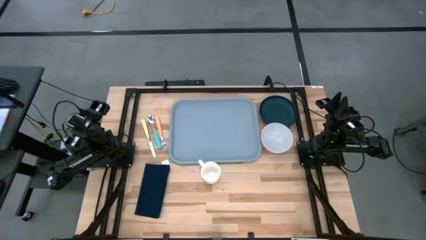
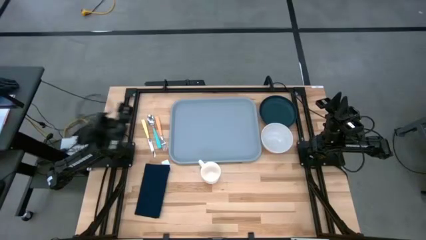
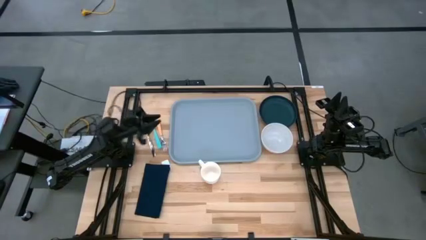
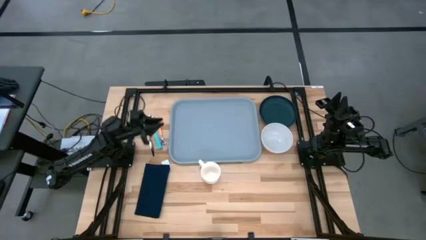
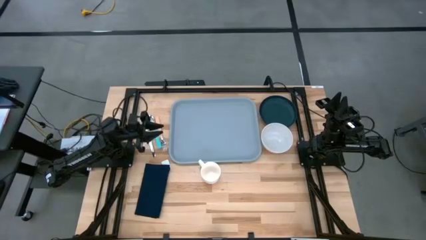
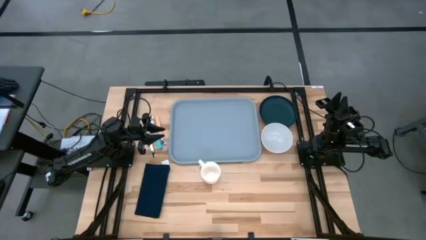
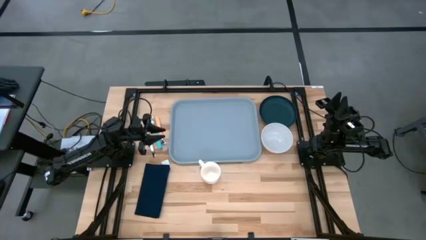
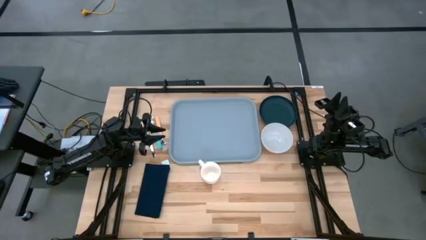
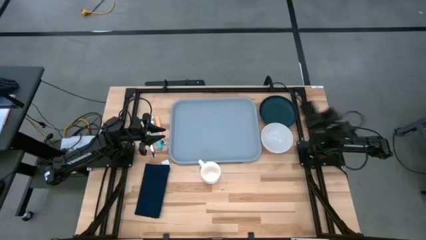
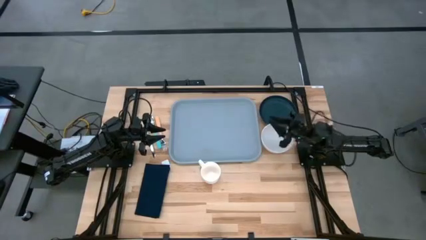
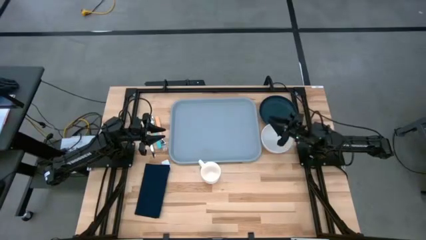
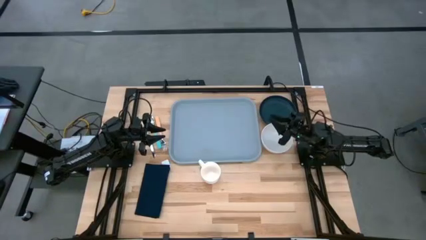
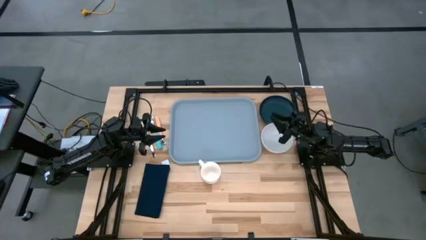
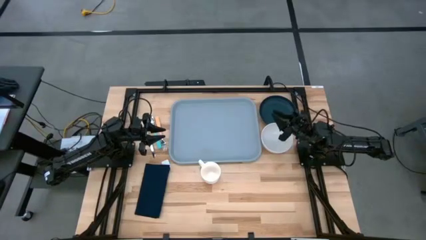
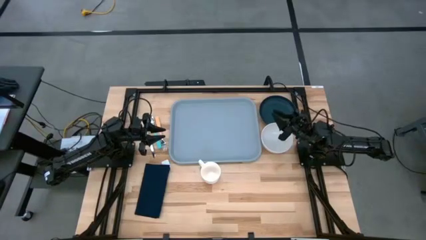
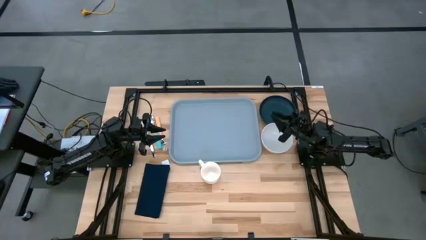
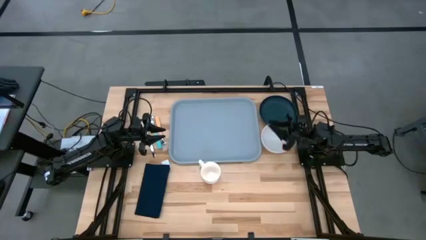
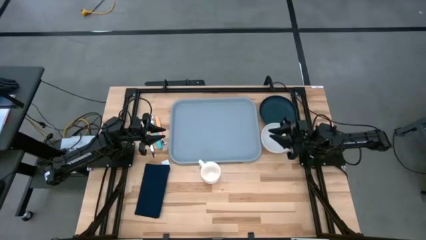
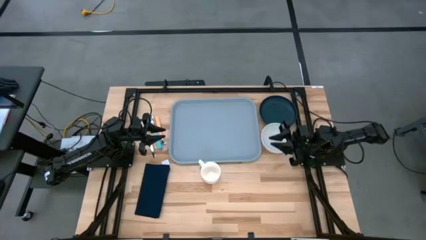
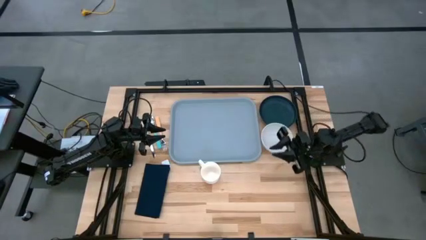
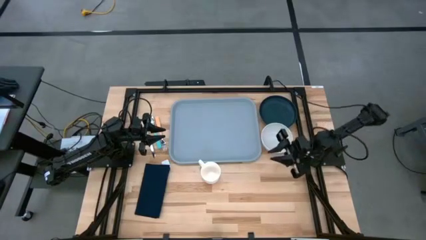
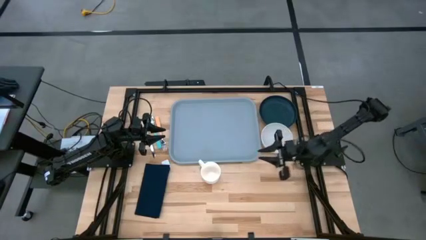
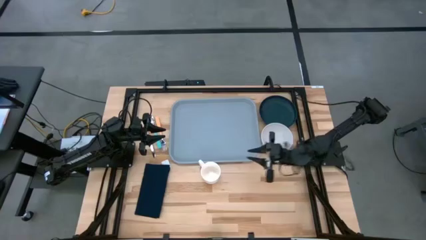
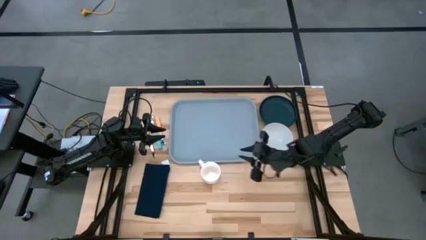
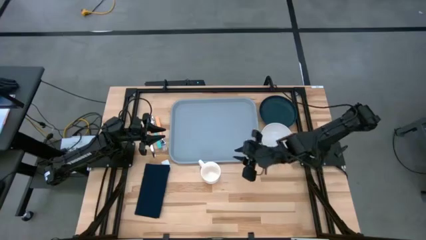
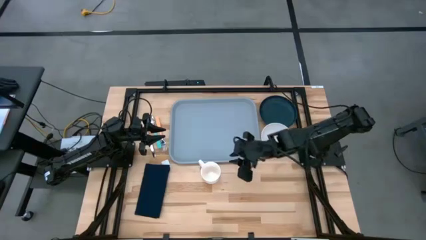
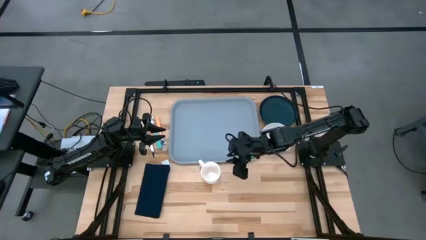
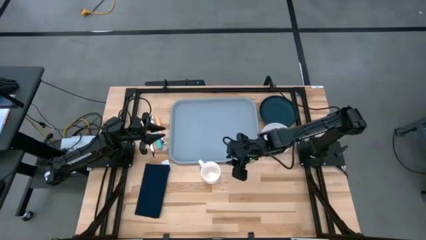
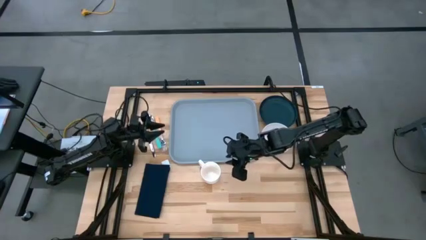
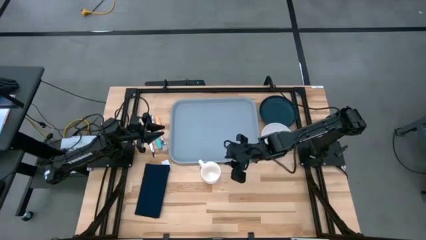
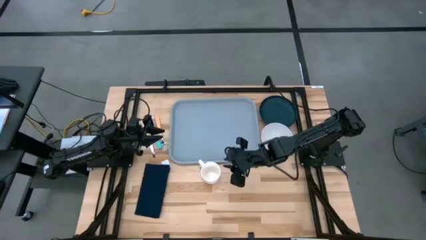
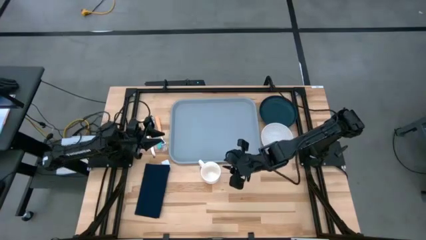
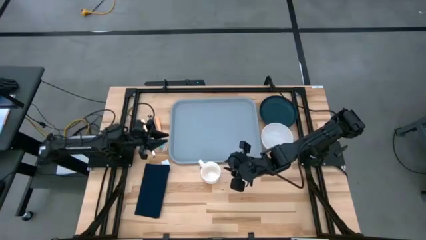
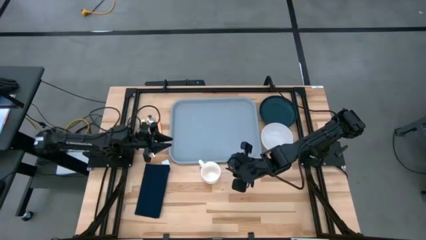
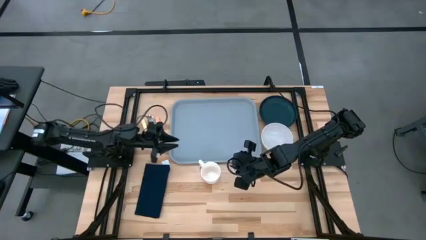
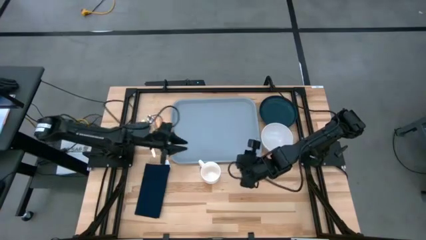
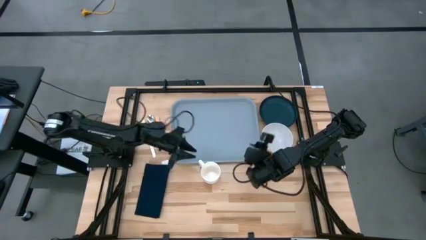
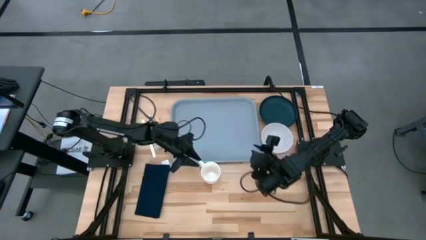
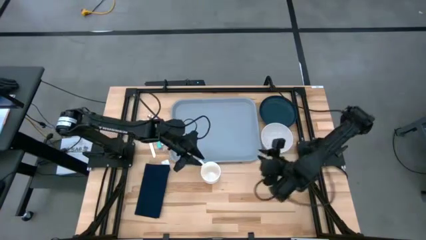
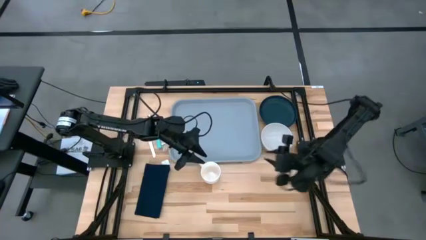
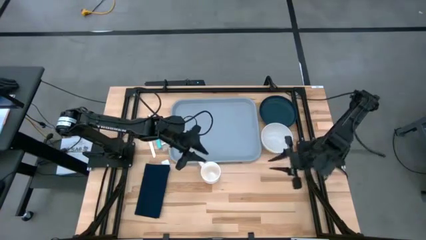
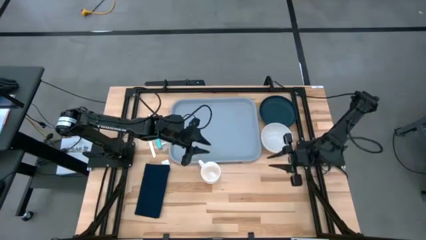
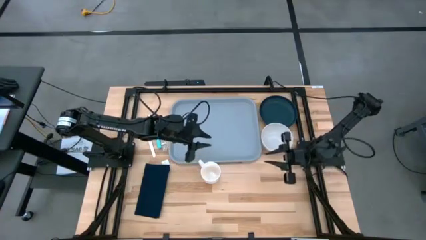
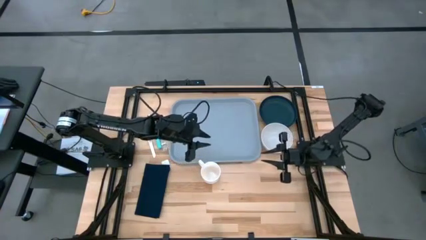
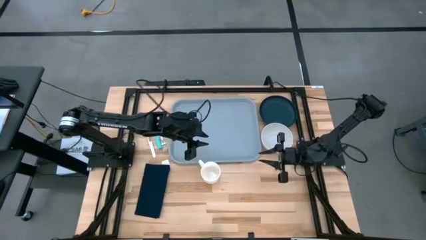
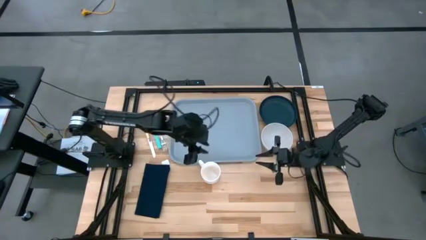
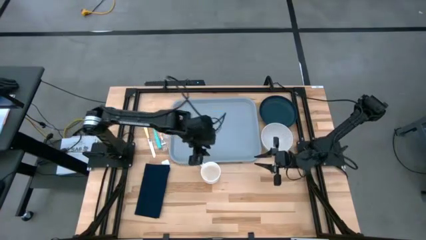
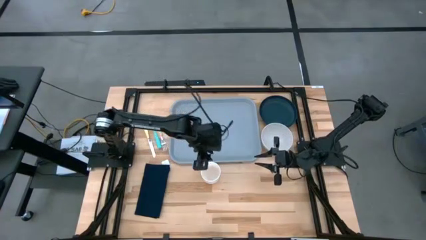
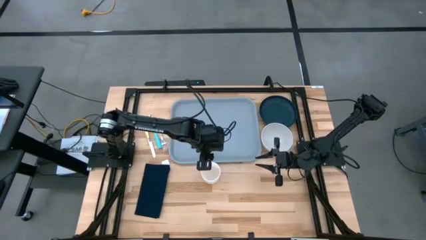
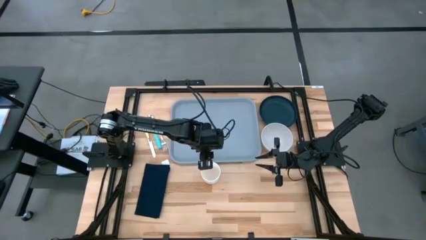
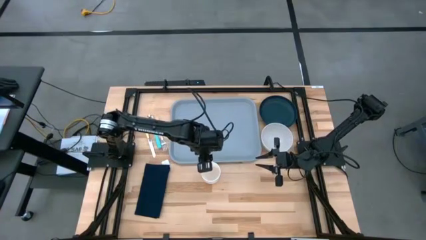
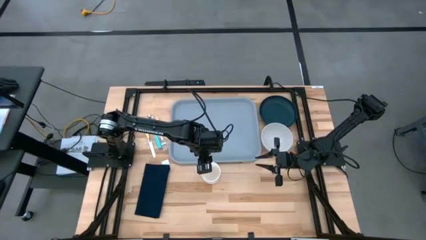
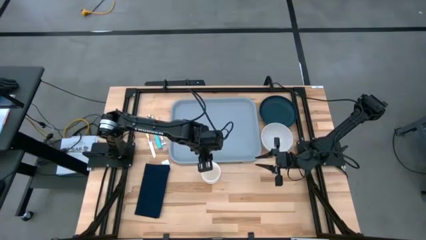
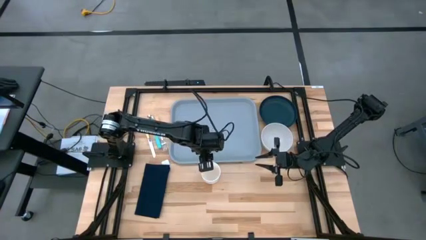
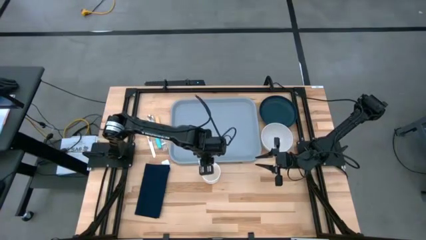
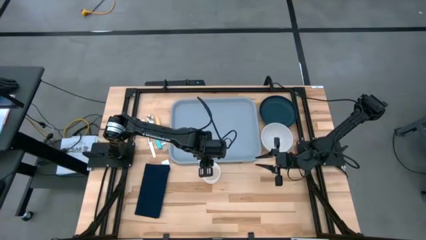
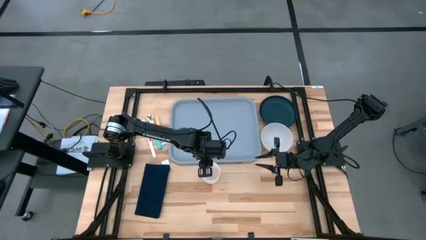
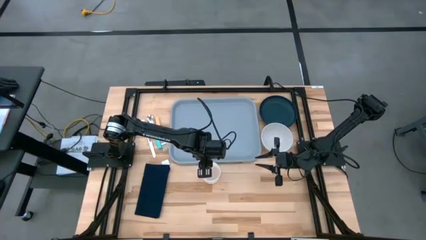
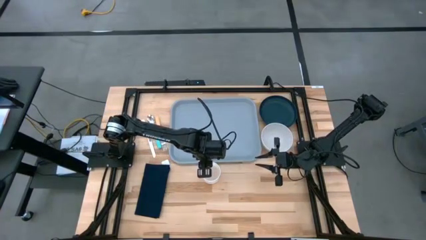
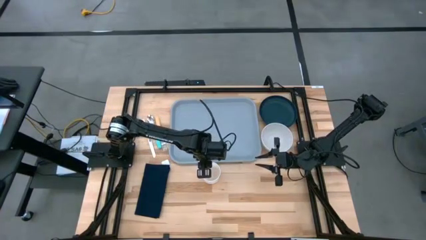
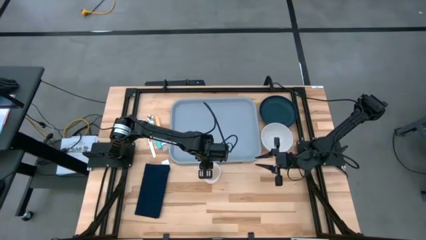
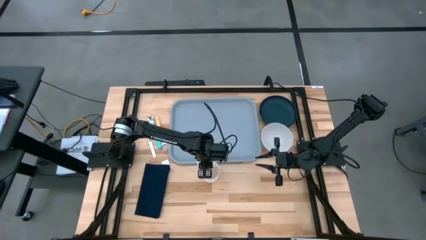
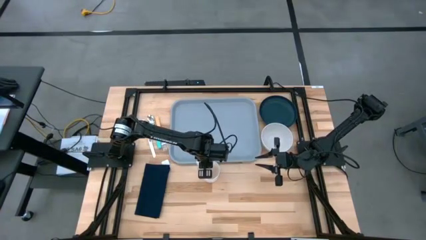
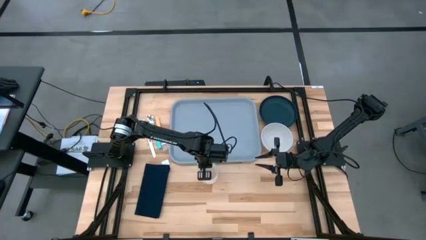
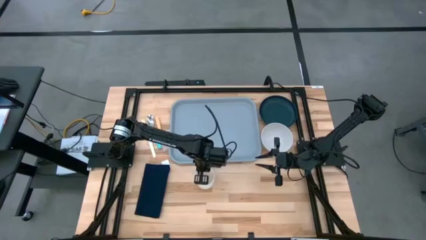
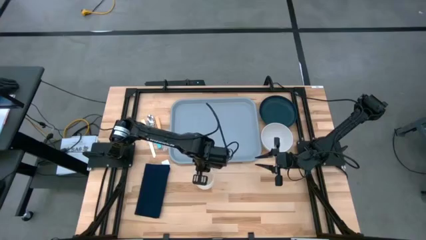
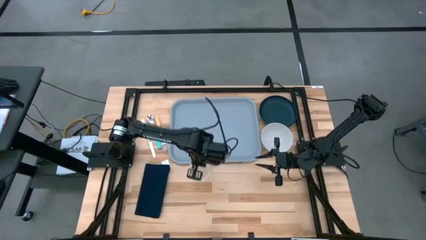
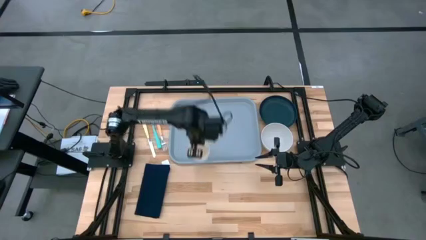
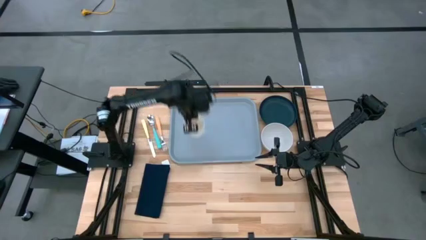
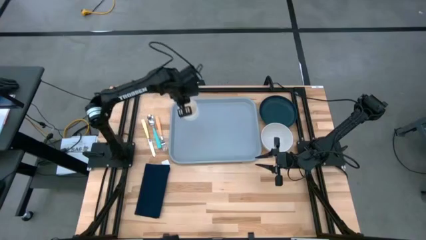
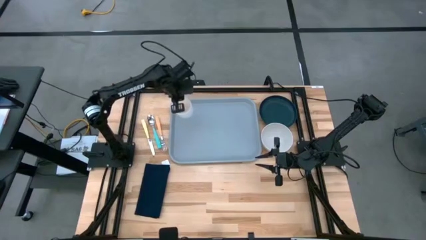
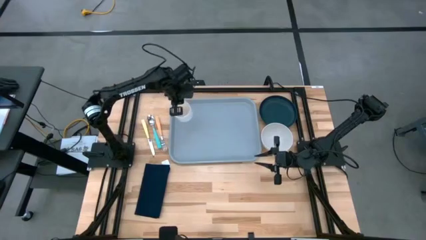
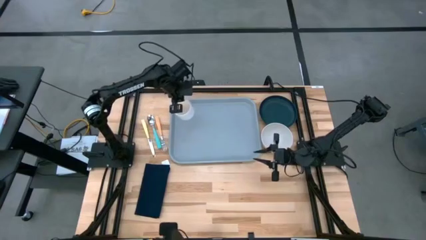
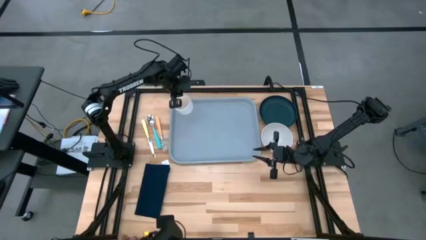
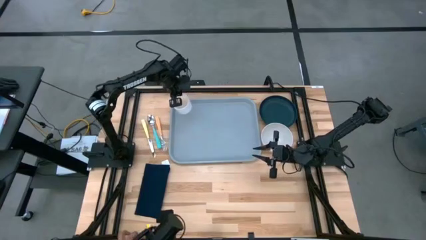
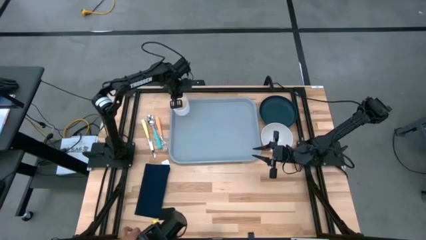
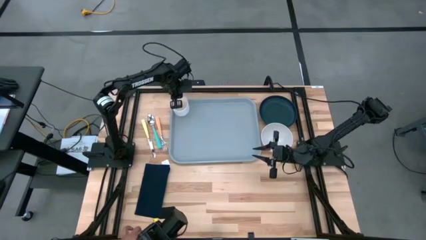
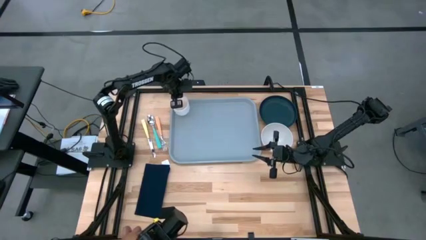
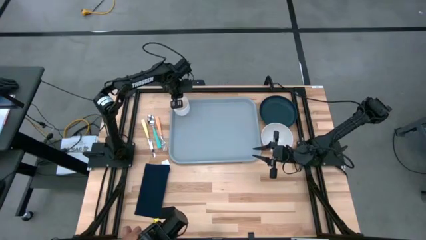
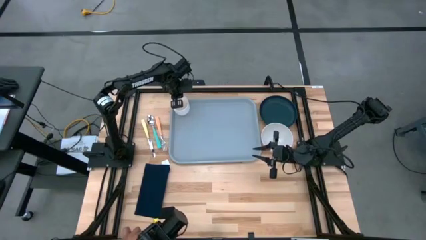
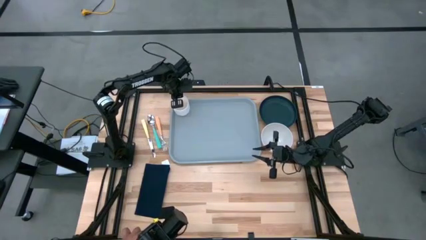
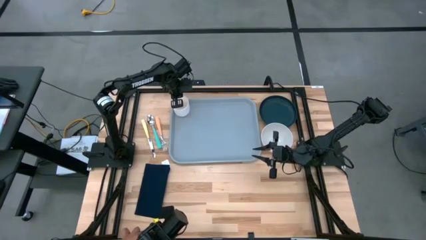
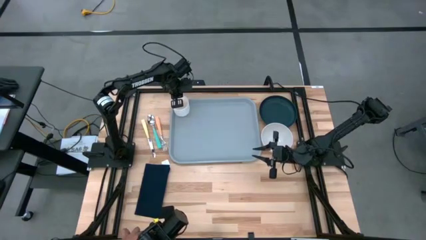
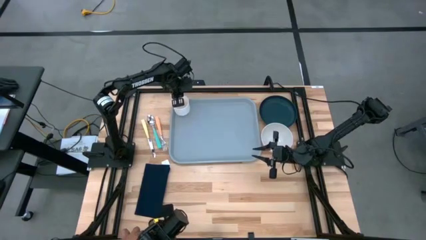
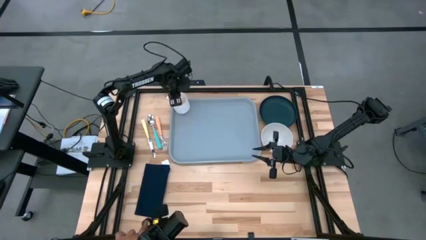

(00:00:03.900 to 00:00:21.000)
Task: Set up tray
Put the white cup on the top left corner of the gray tray
